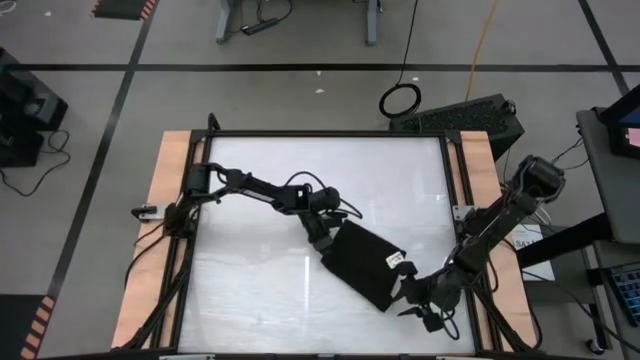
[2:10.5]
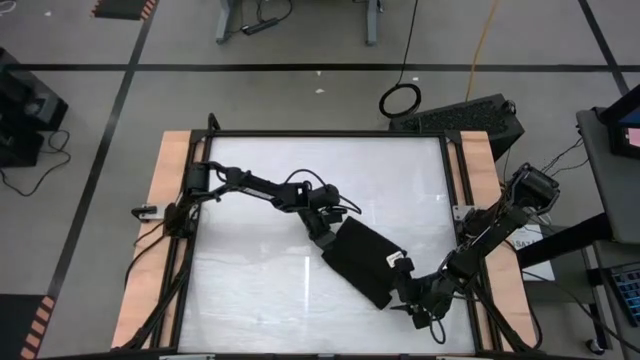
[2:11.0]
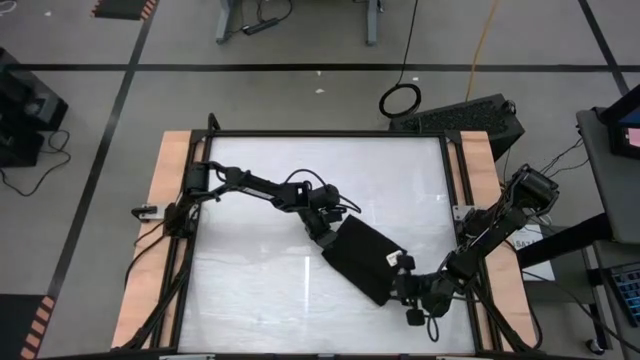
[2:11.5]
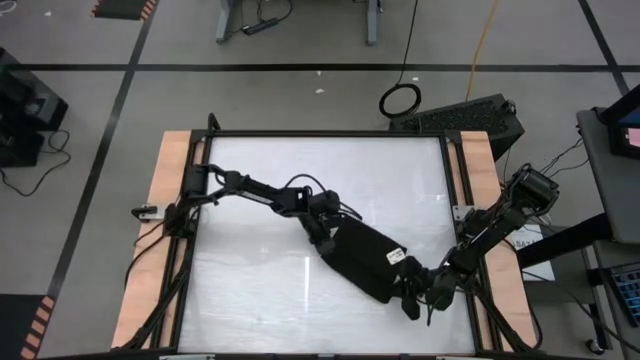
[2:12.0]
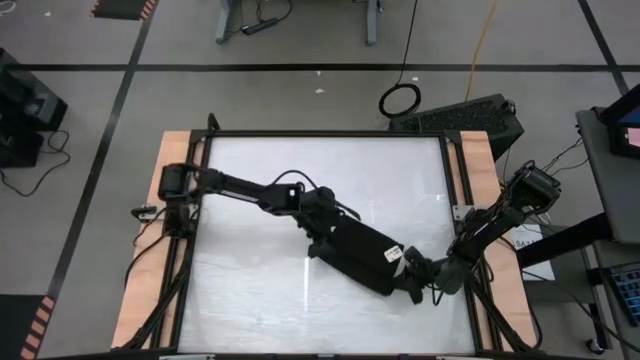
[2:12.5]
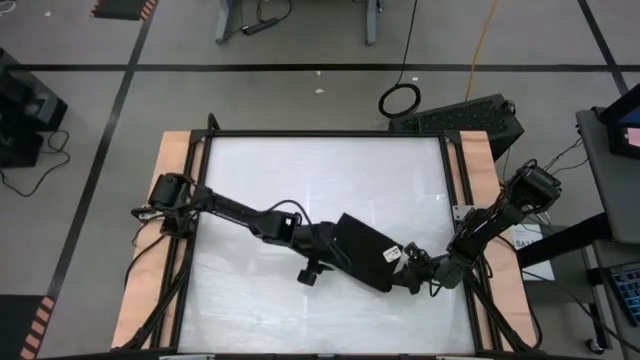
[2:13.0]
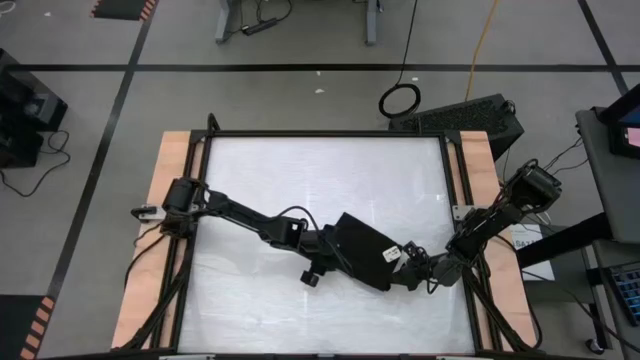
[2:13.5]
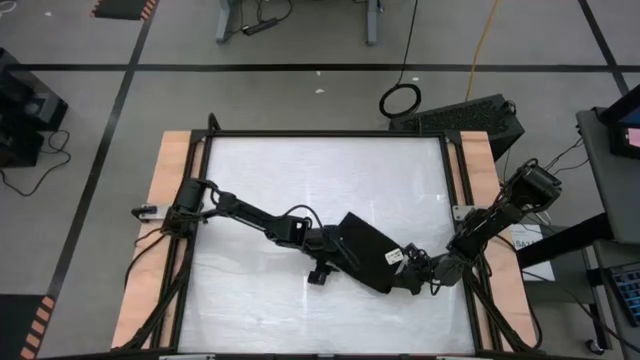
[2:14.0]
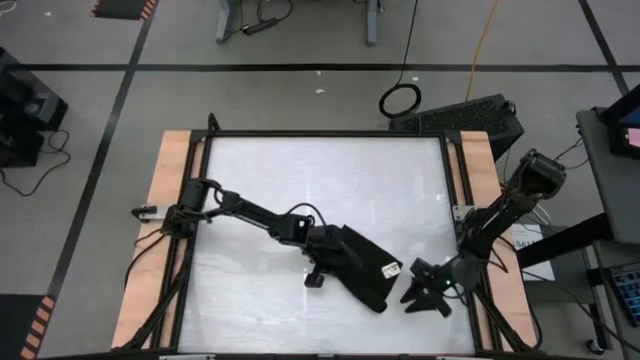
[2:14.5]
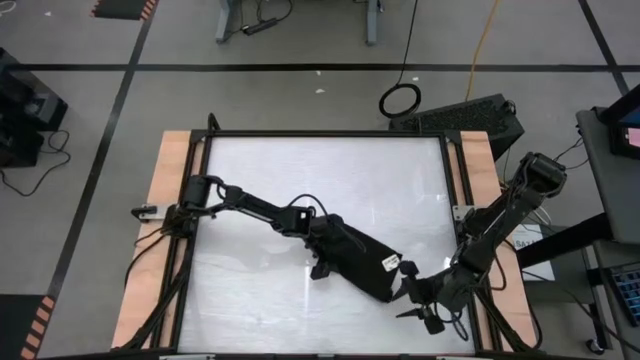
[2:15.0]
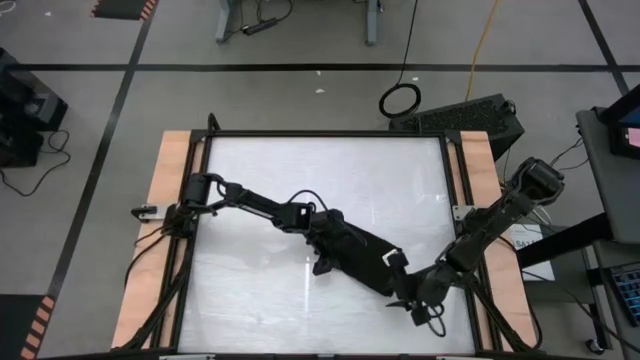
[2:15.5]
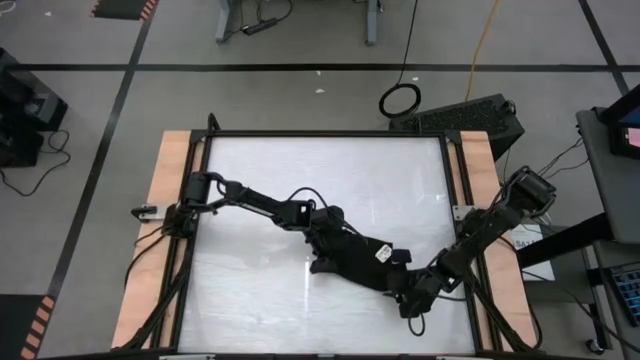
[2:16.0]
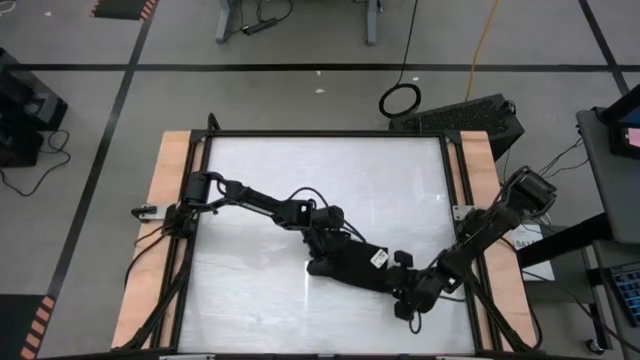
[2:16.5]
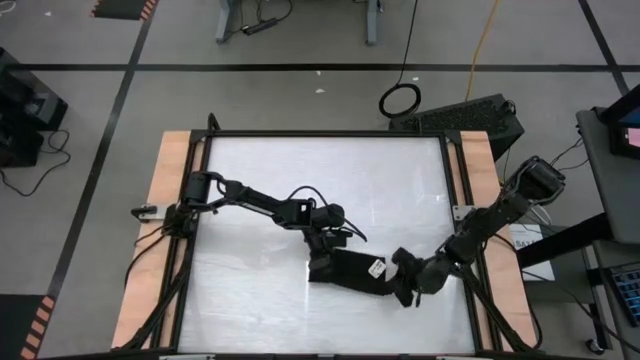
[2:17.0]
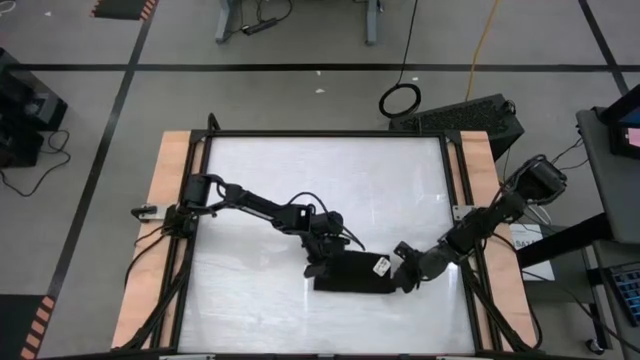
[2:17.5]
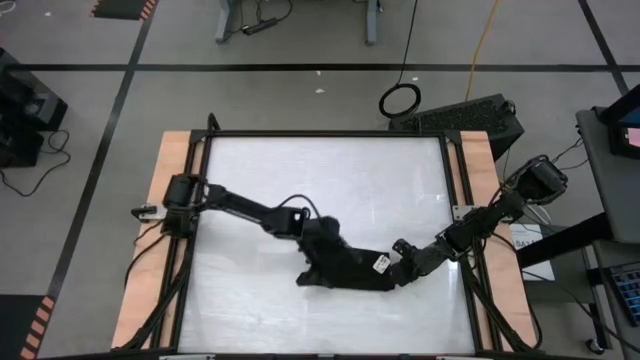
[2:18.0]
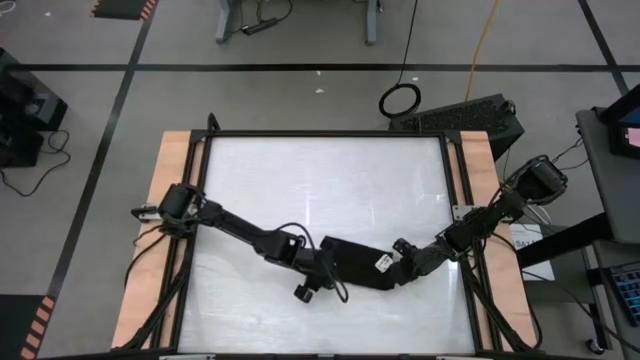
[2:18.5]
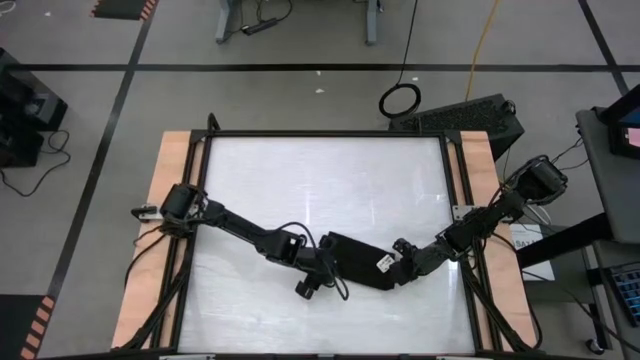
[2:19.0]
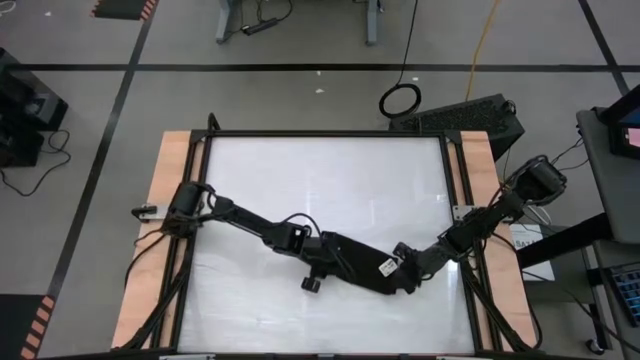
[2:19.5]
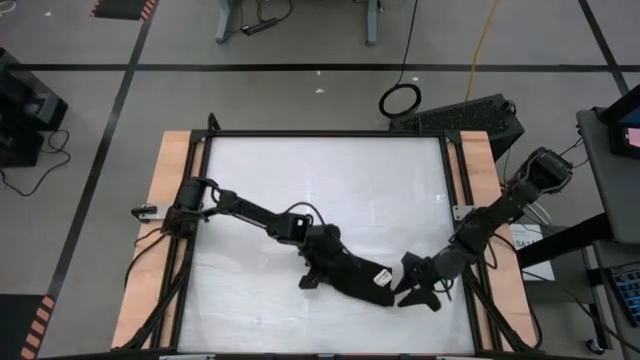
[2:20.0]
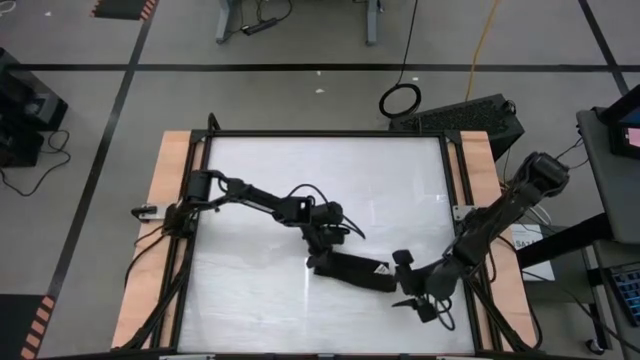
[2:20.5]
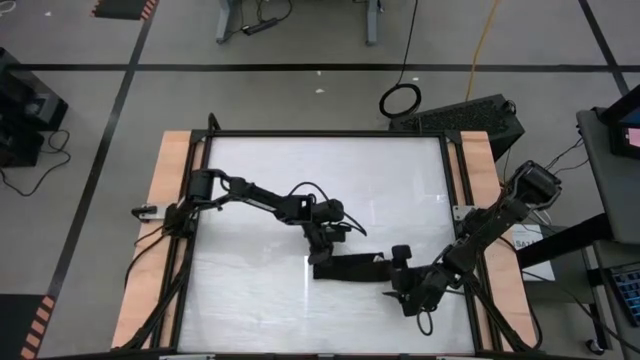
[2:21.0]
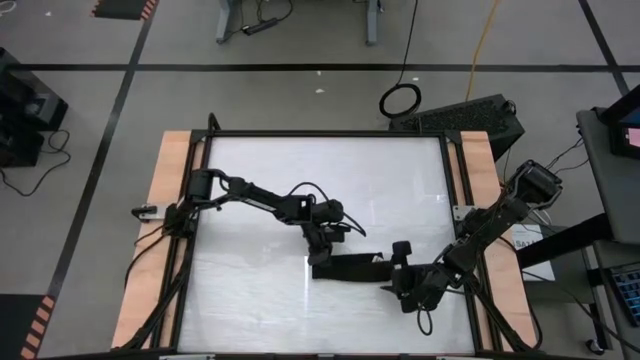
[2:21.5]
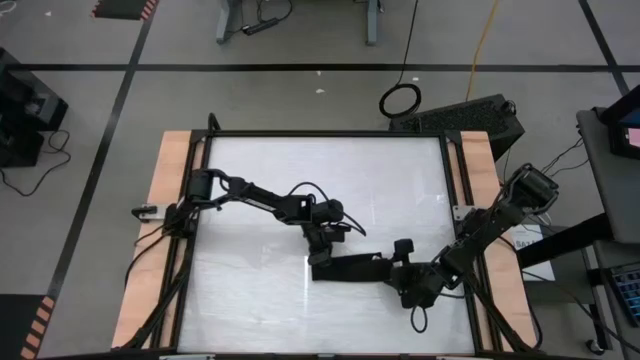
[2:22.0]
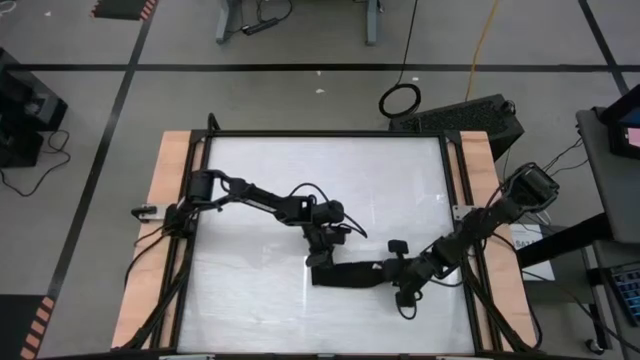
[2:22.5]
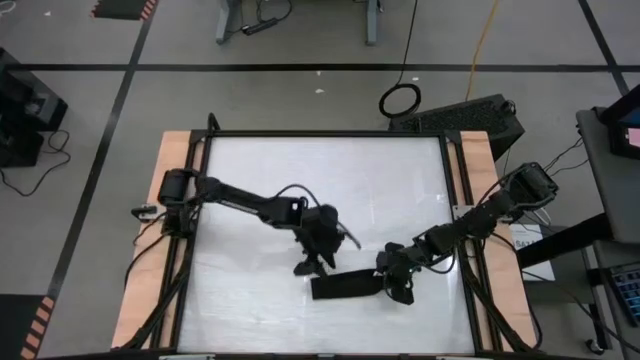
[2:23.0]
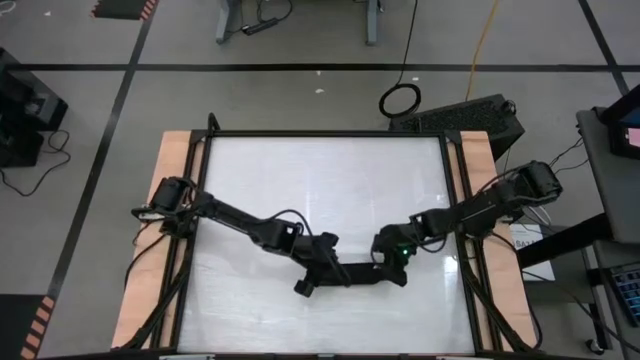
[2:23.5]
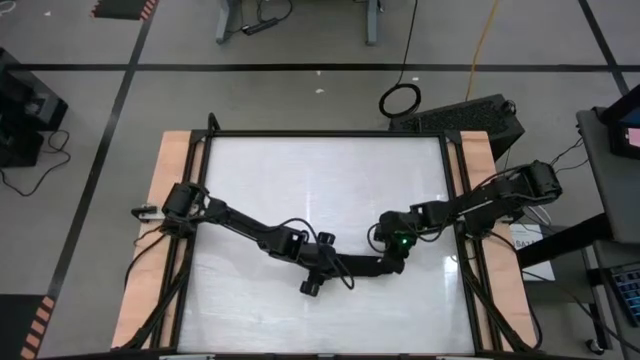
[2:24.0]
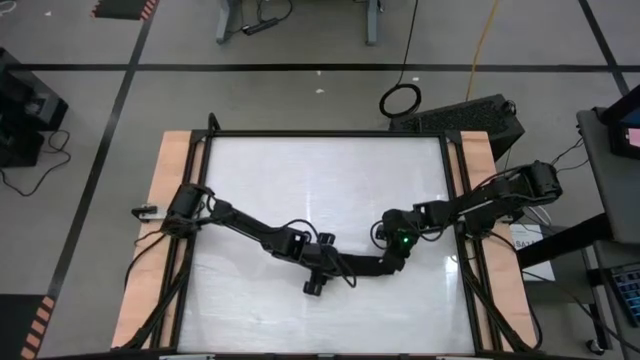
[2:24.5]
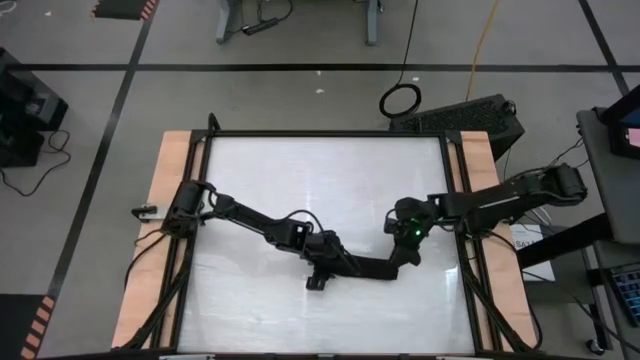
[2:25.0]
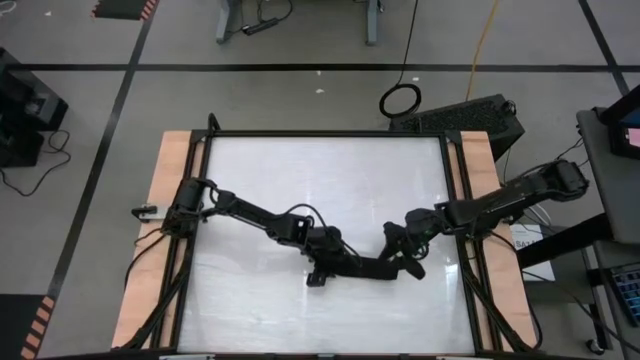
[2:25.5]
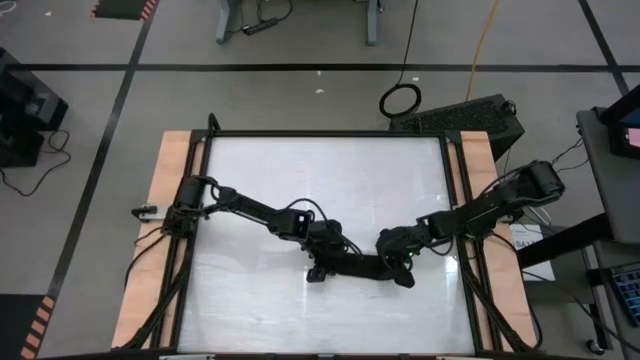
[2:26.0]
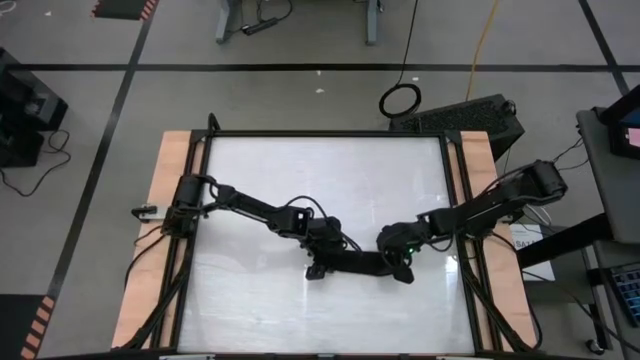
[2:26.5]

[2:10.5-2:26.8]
Task: Roll towel into tight, uniform cylinder
Roll the black towel

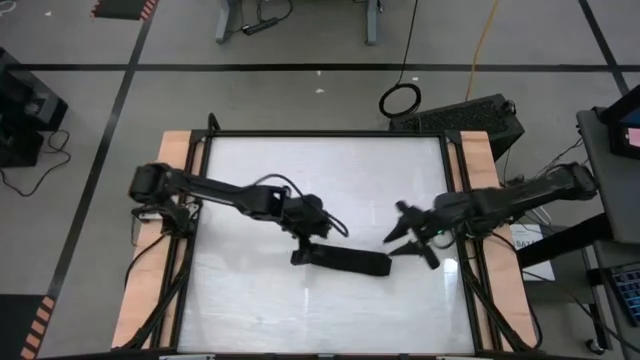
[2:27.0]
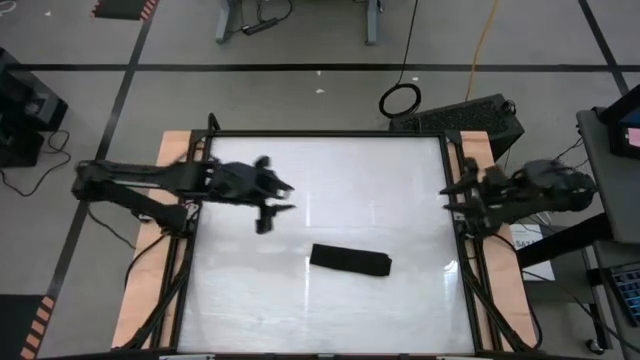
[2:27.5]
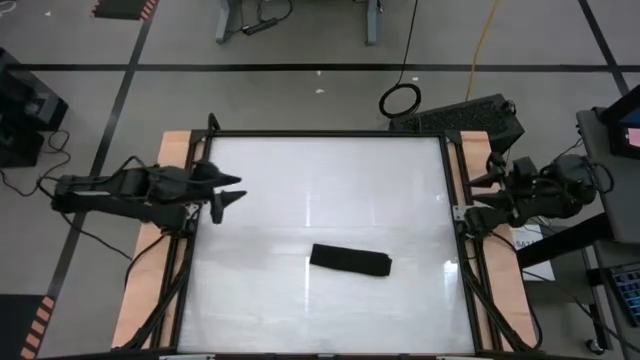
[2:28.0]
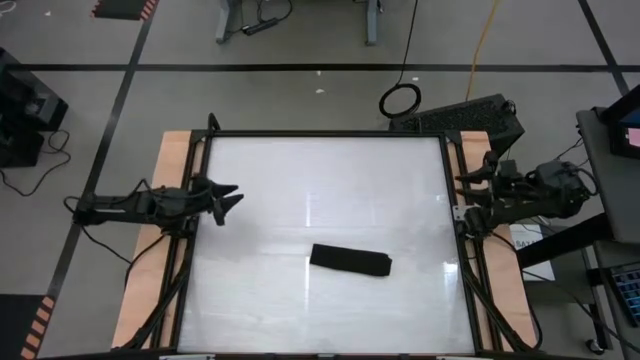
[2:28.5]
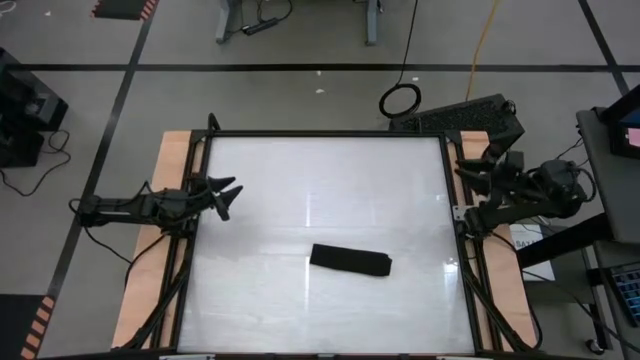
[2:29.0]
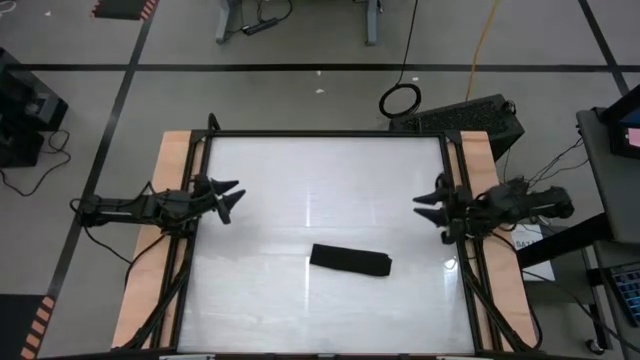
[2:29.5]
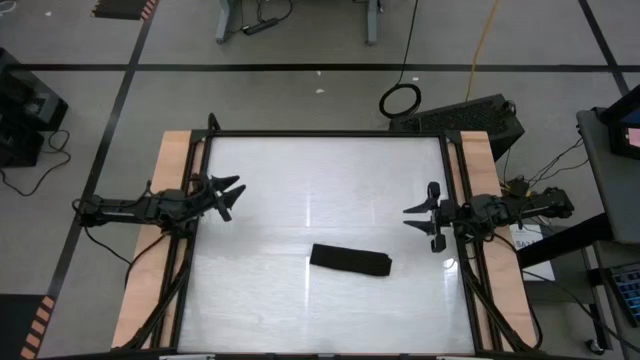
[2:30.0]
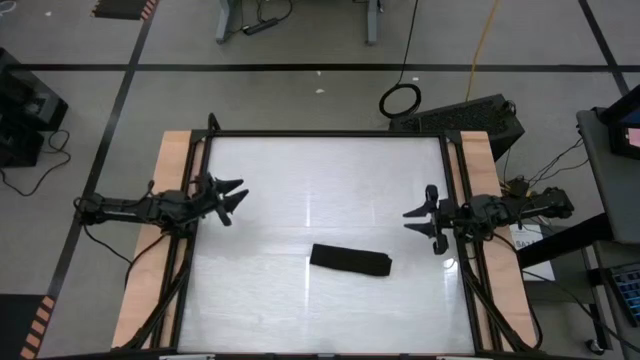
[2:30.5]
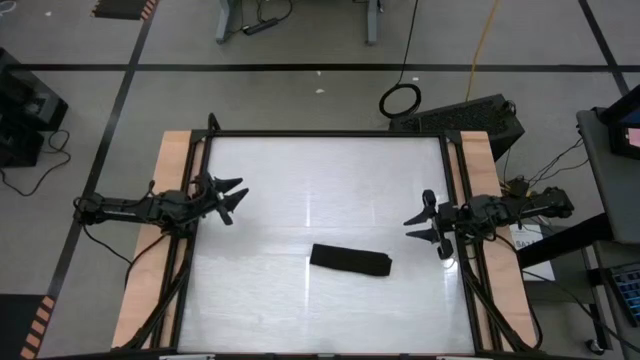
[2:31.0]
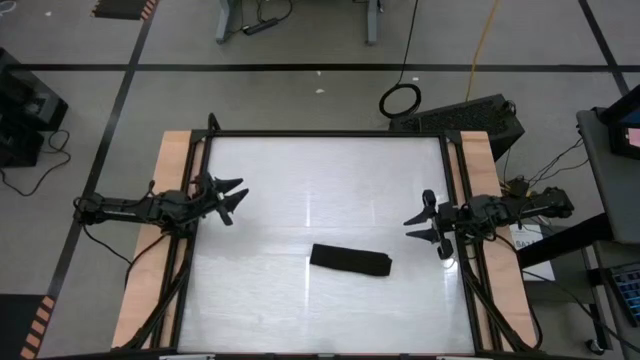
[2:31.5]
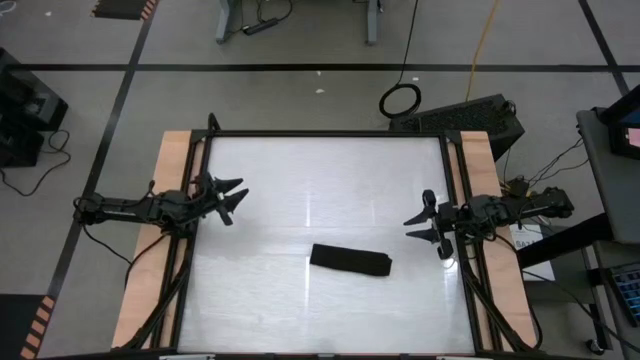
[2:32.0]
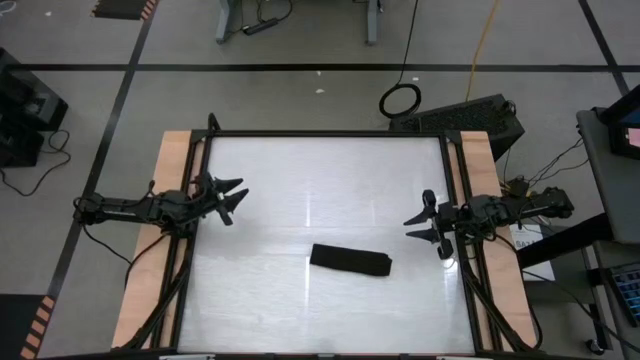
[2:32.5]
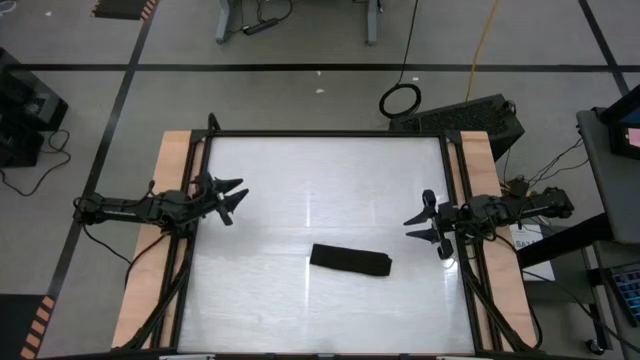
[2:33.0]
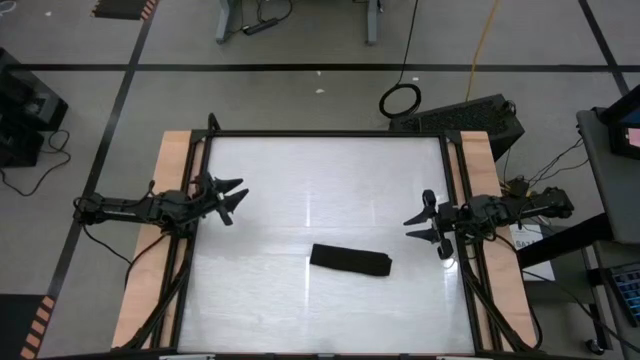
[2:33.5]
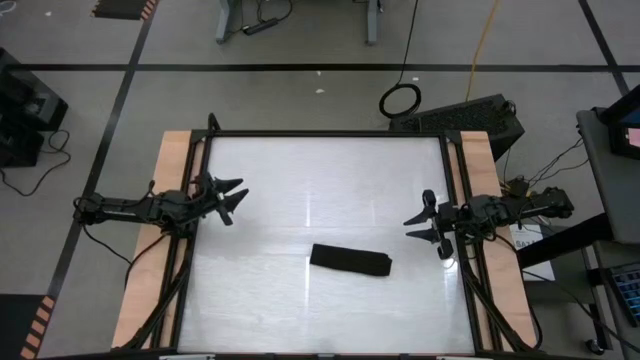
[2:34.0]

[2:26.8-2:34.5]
Return to Home Position
